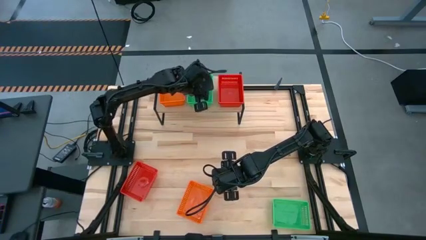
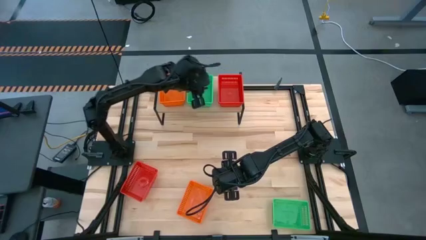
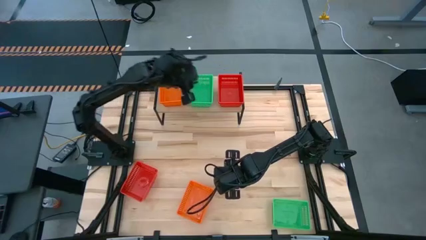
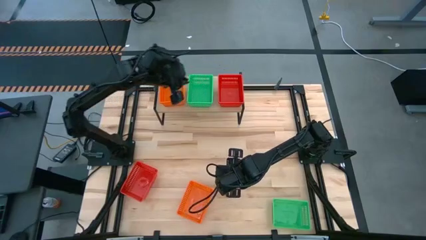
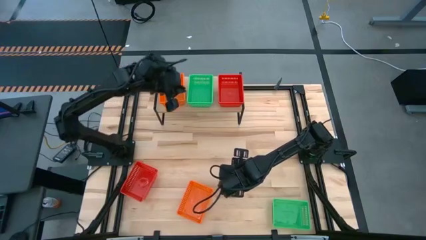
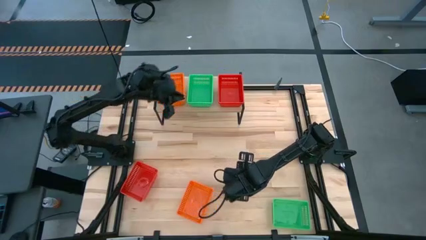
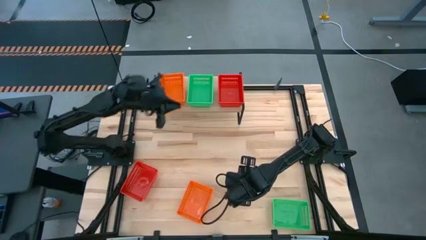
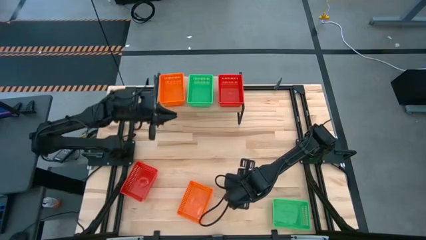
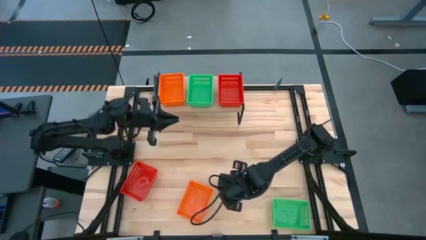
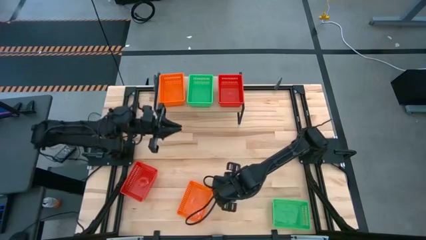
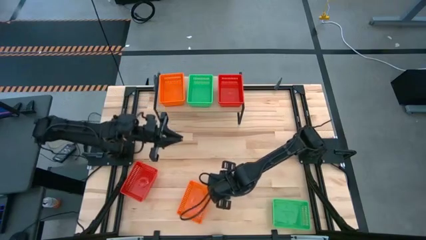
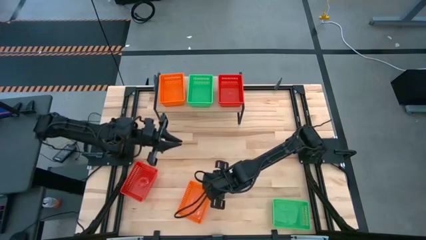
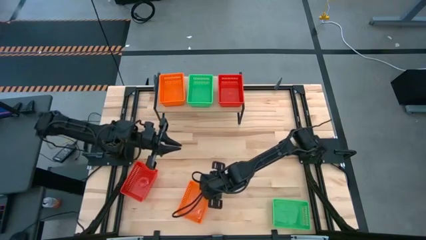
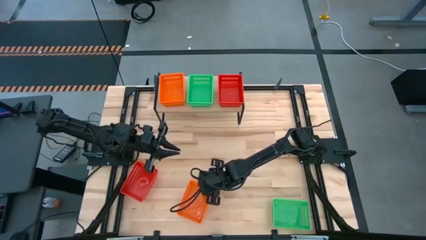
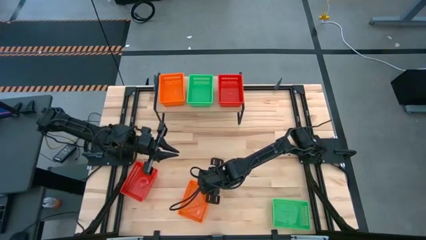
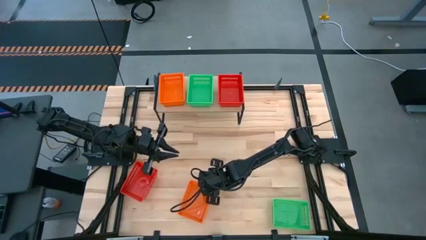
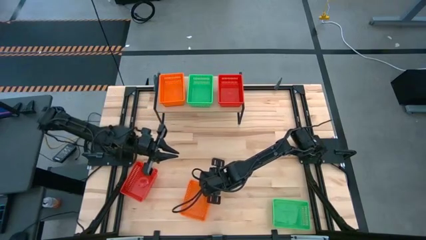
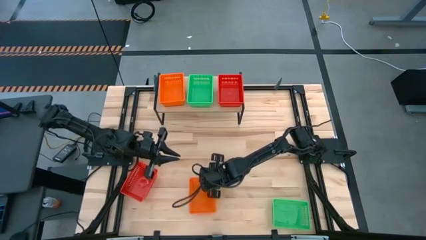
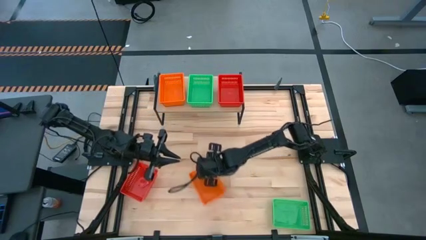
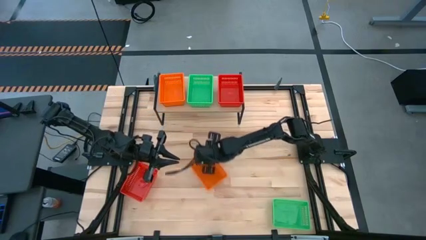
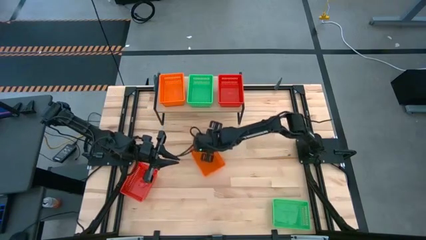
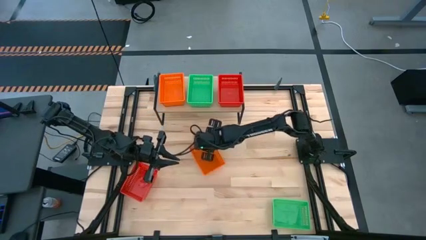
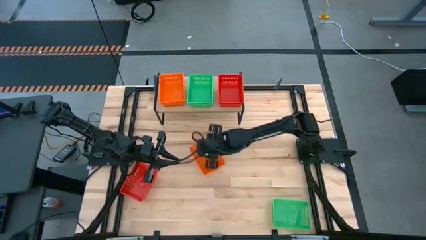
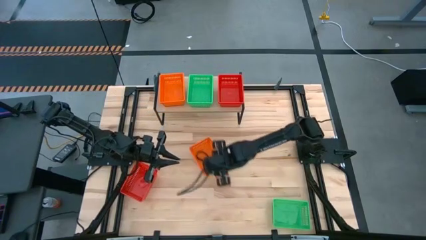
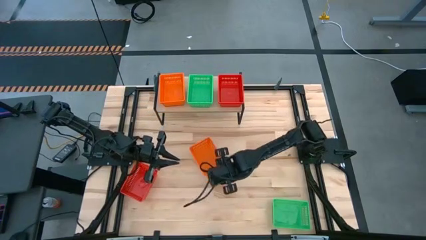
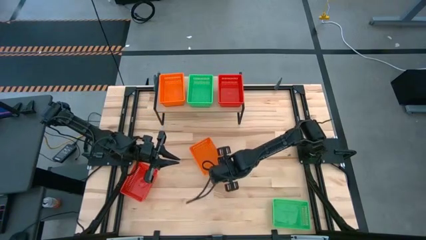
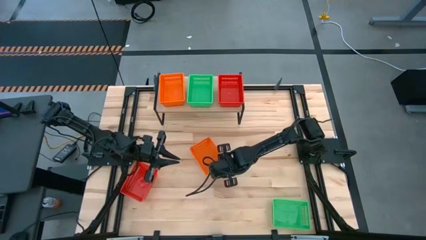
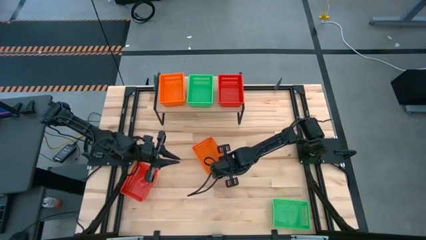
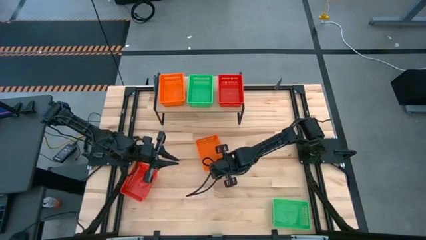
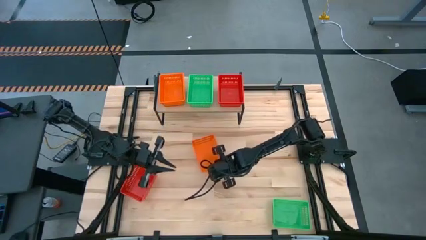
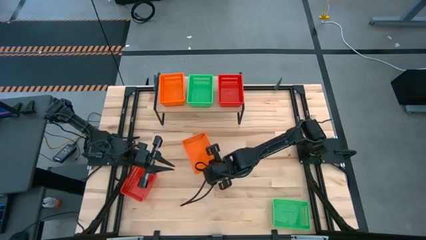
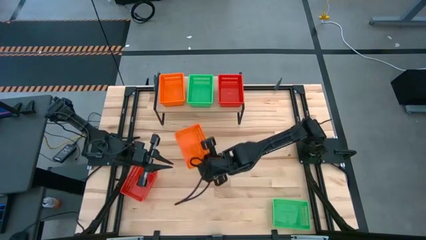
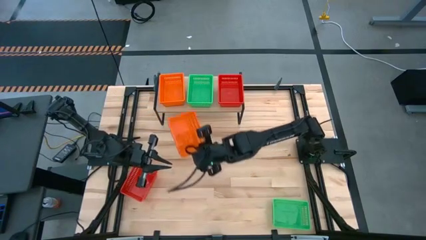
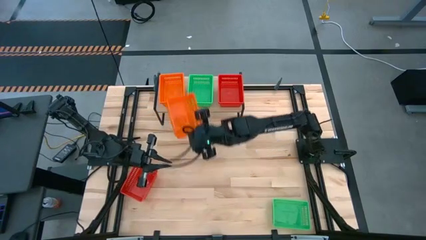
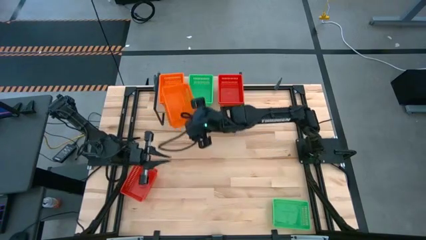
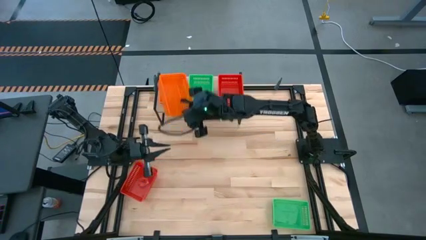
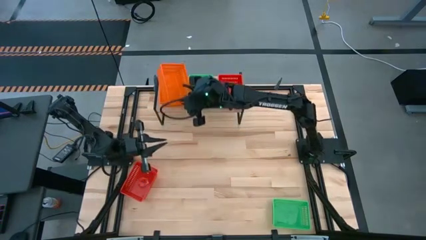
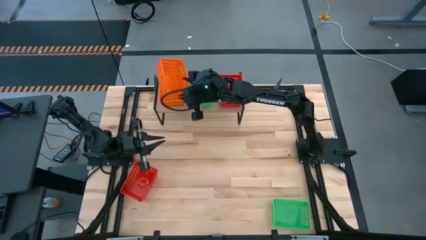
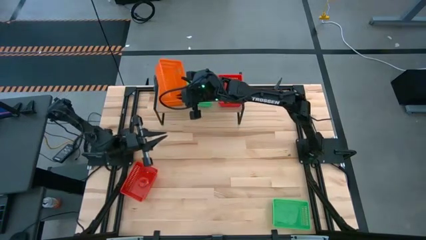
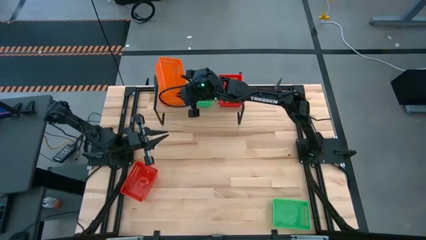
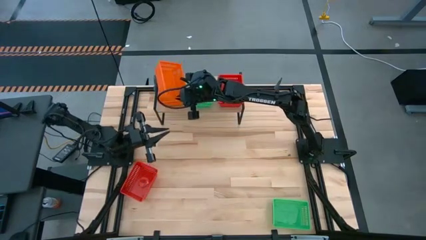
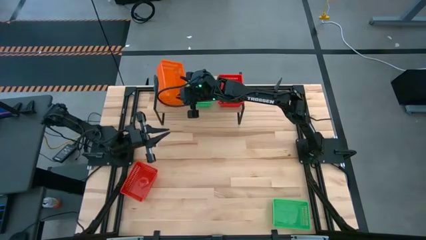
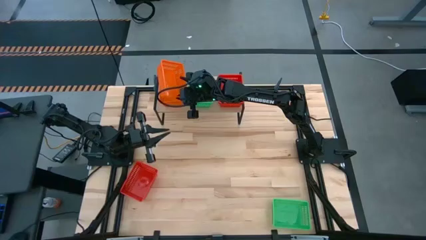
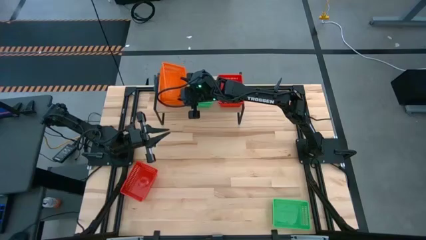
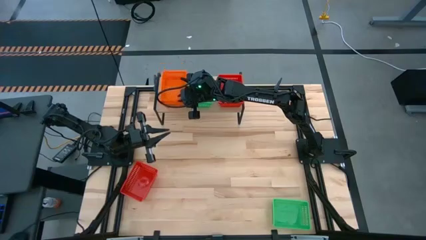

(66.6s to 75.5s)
Task: Stack baskets on shelf by color
Stack the orange bin on the orange bin on the shelf

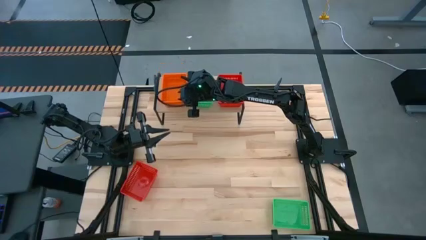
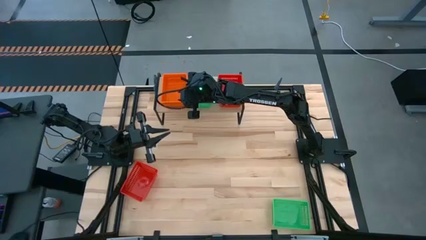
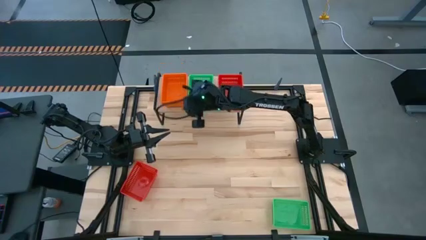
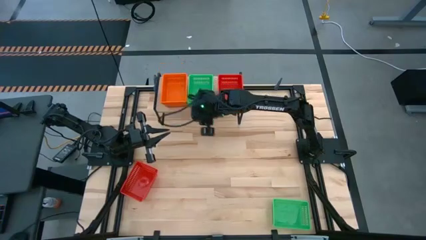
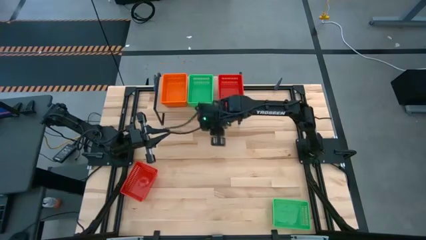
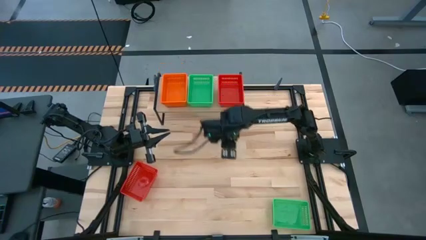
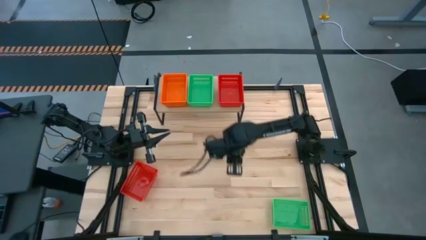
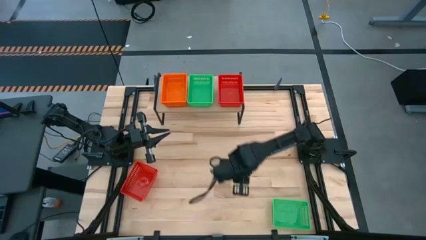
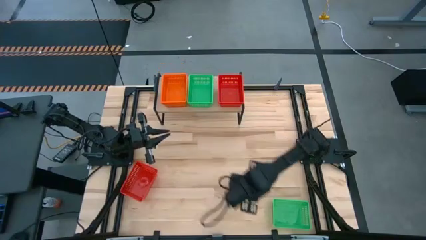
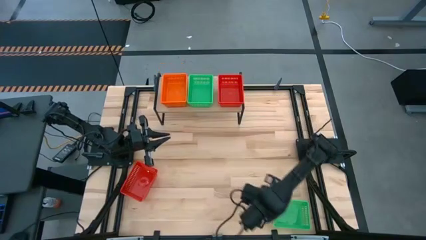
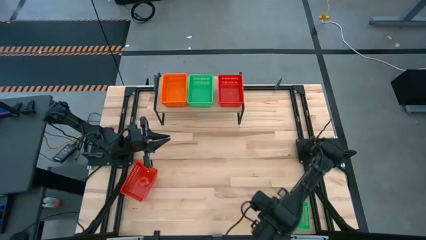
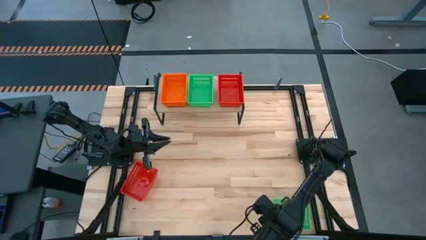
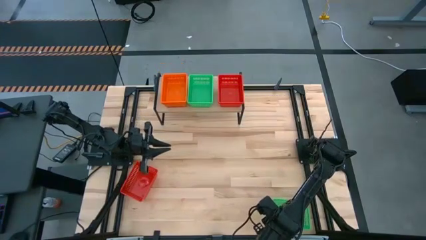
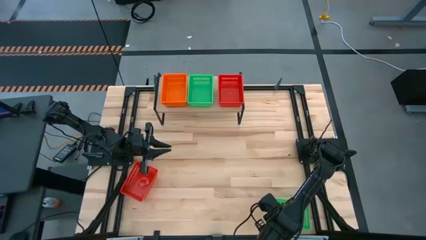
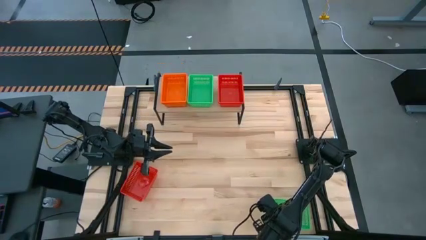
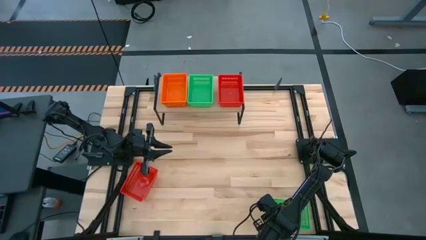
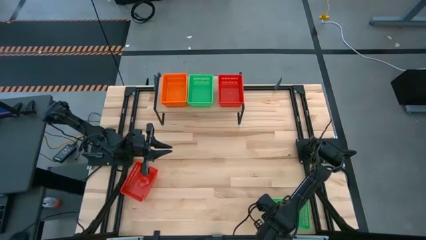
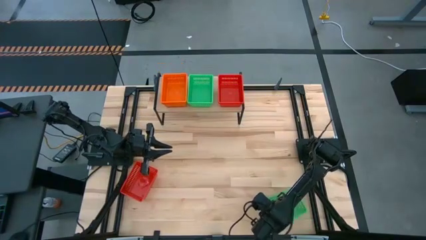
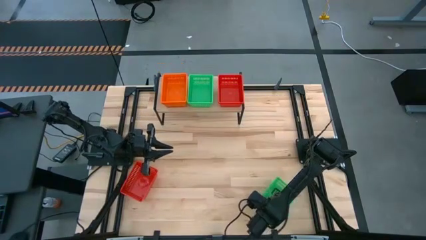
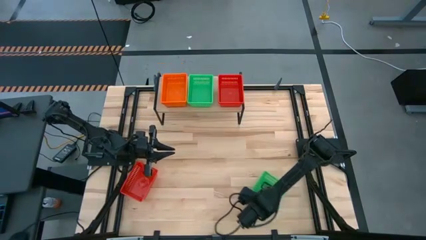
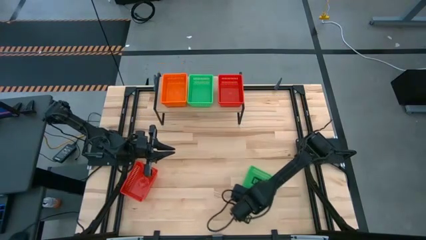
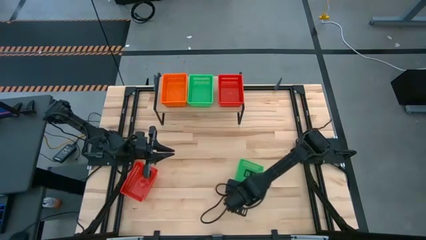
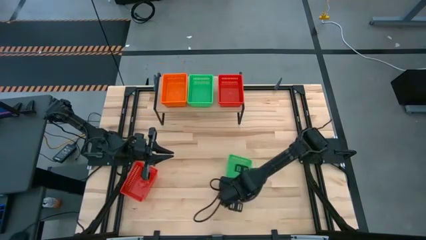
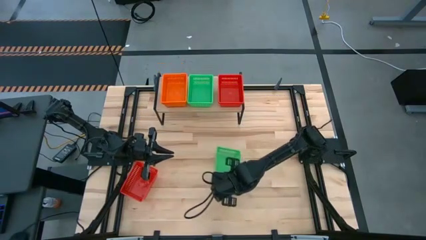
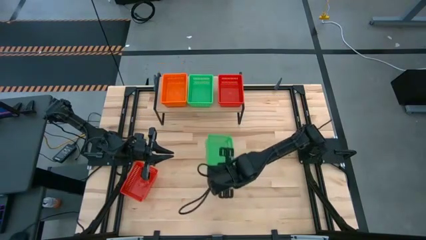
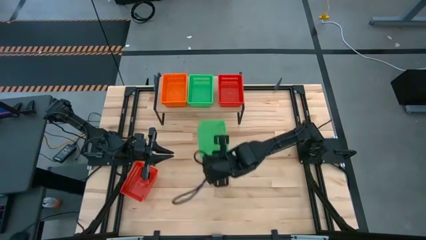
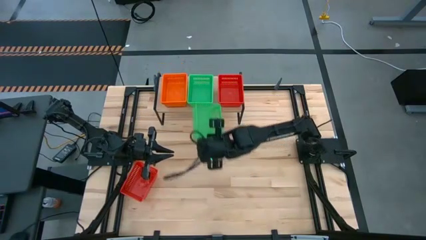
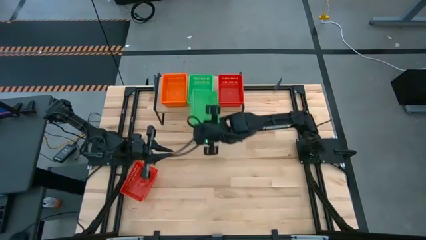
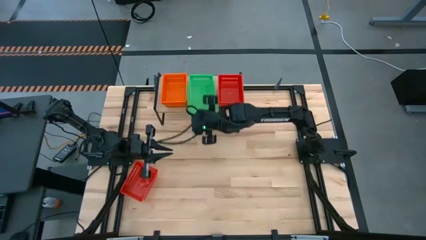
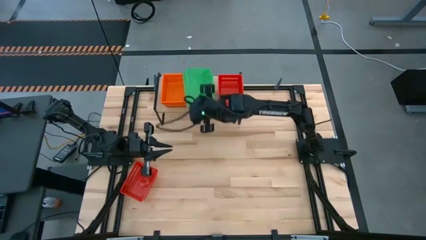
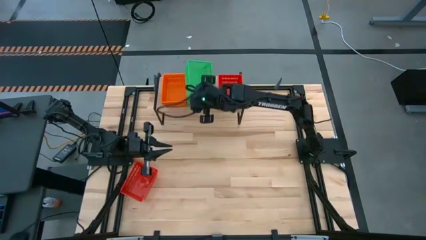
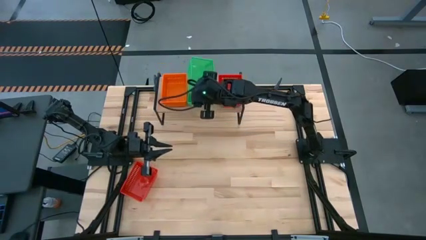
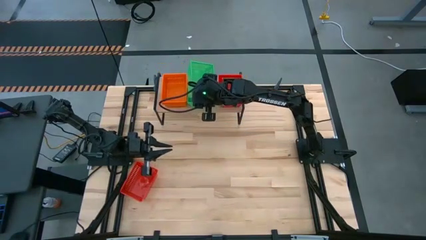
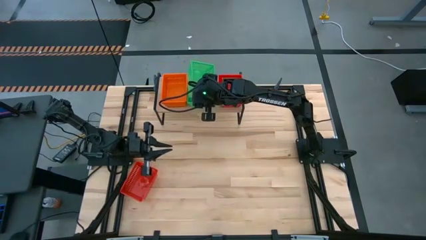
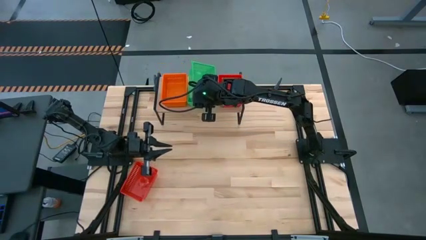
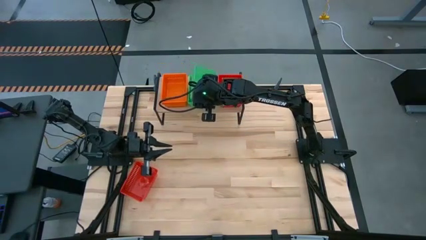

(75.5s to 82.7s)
Stack the green bin on the green bin on the shelf
